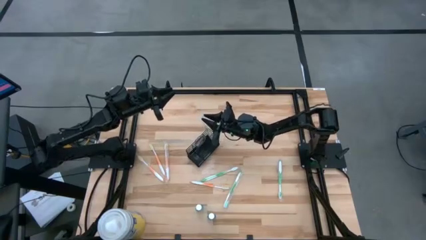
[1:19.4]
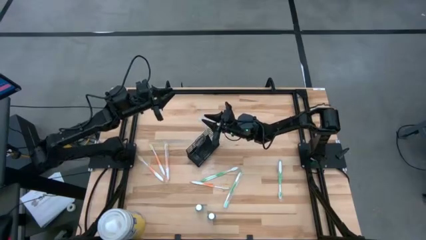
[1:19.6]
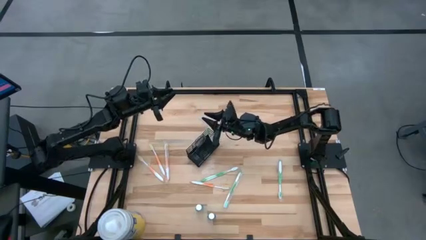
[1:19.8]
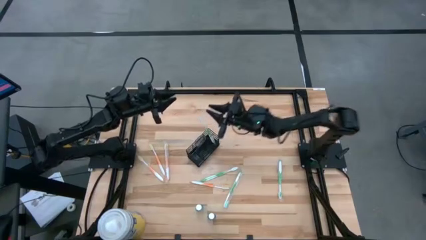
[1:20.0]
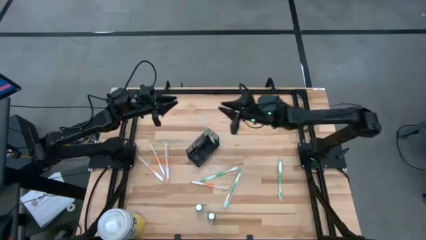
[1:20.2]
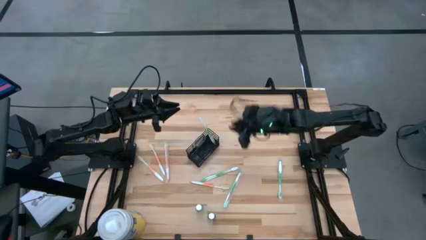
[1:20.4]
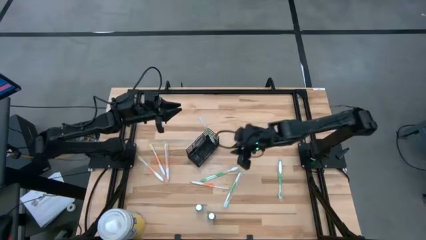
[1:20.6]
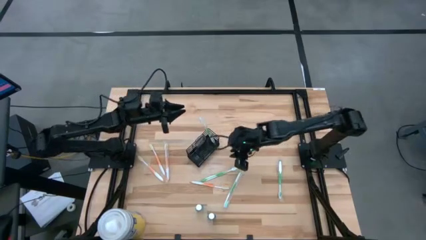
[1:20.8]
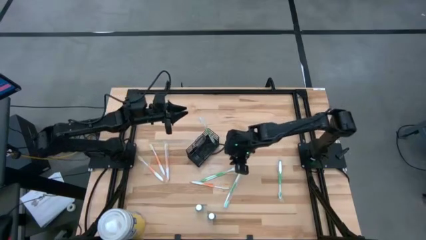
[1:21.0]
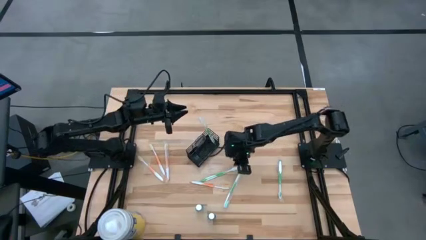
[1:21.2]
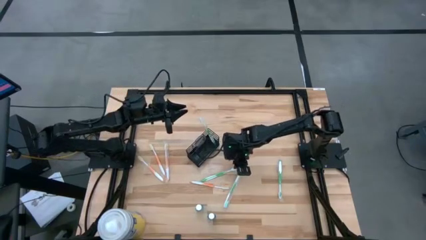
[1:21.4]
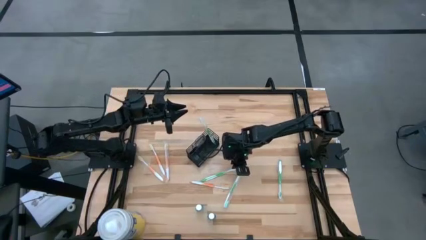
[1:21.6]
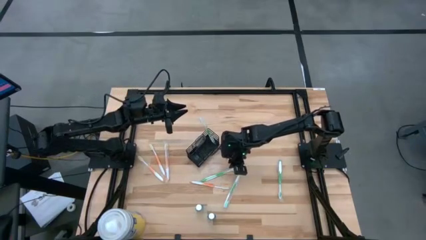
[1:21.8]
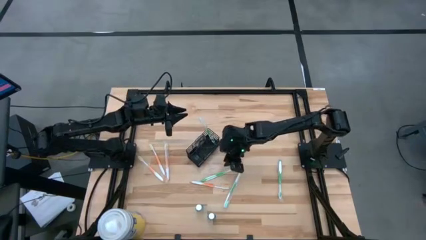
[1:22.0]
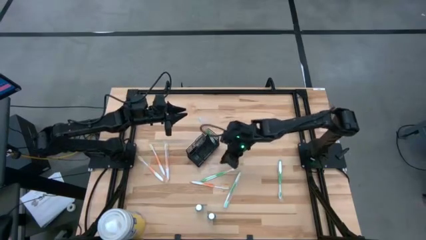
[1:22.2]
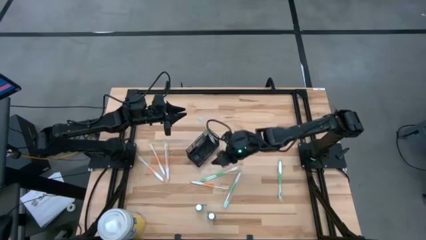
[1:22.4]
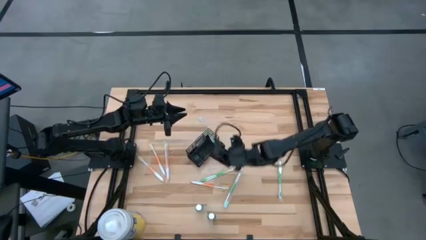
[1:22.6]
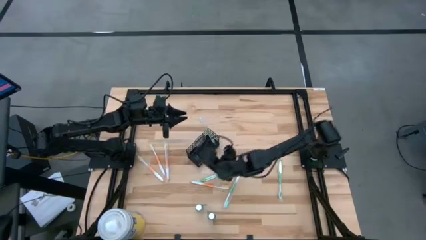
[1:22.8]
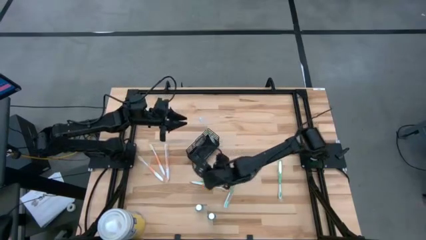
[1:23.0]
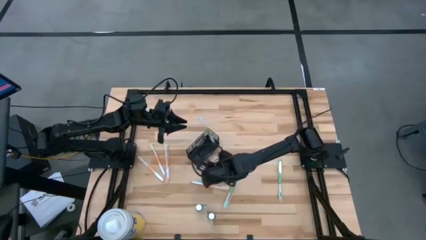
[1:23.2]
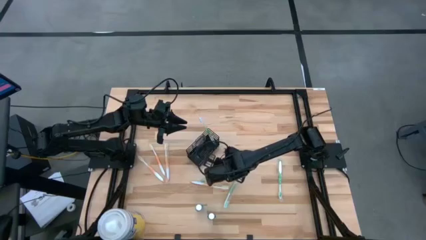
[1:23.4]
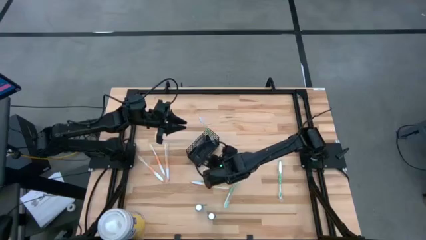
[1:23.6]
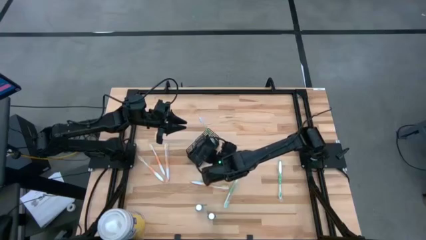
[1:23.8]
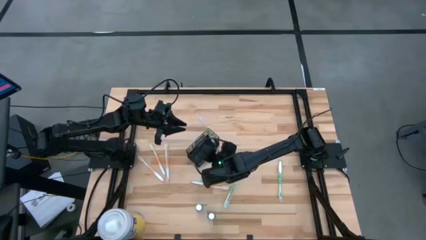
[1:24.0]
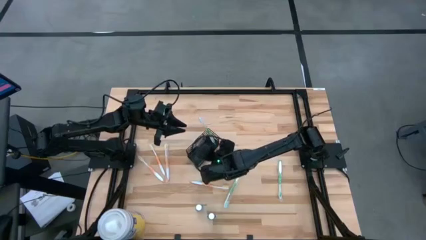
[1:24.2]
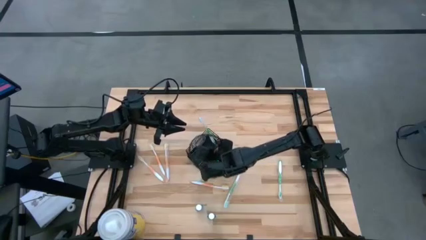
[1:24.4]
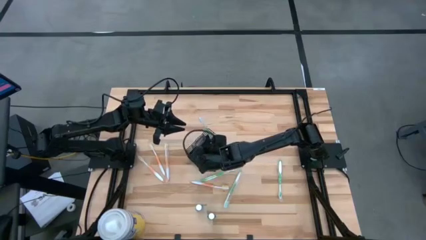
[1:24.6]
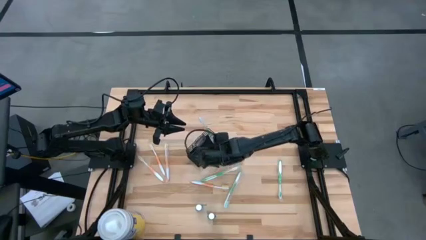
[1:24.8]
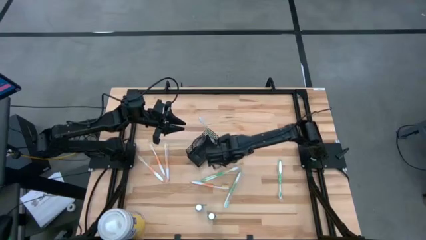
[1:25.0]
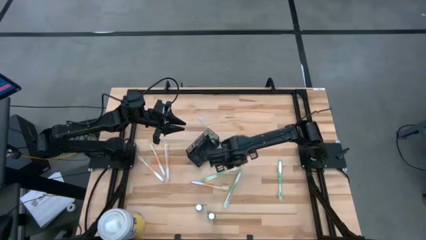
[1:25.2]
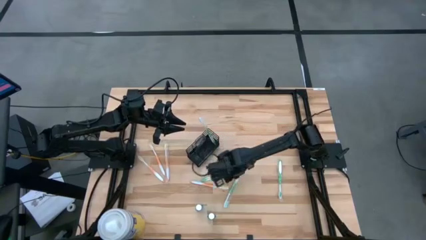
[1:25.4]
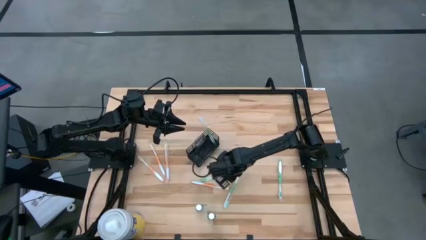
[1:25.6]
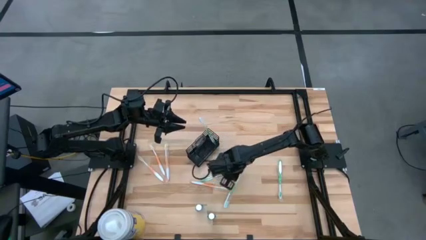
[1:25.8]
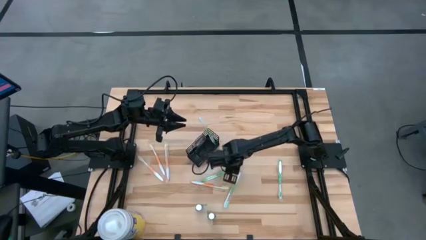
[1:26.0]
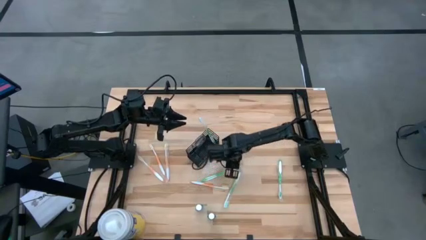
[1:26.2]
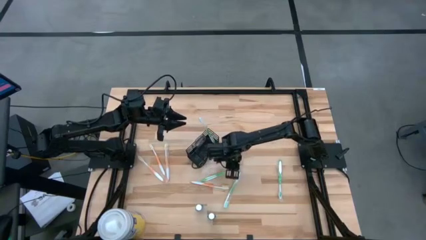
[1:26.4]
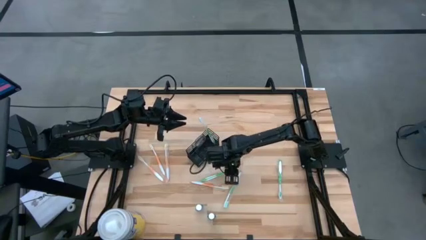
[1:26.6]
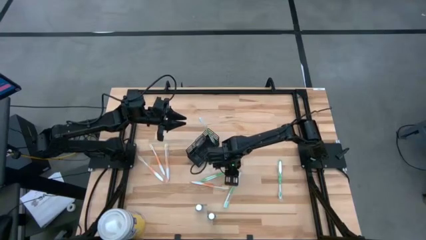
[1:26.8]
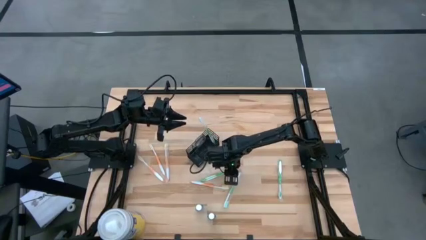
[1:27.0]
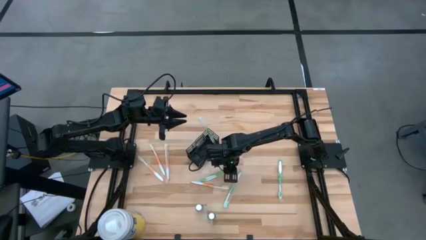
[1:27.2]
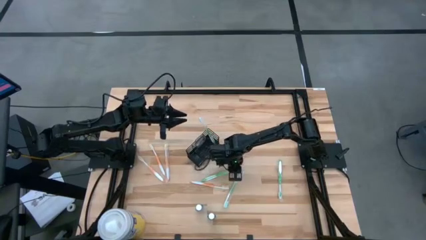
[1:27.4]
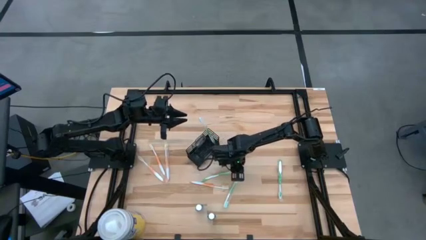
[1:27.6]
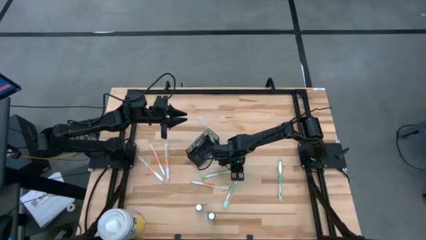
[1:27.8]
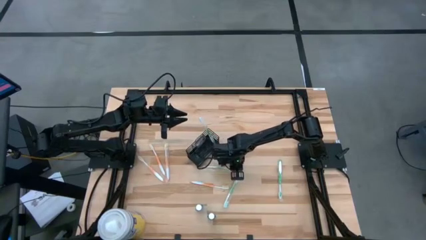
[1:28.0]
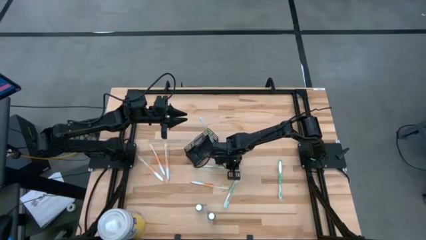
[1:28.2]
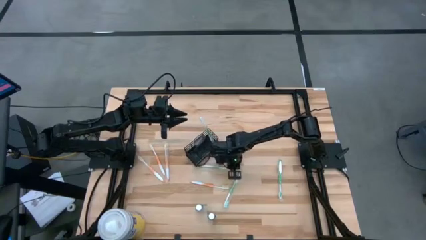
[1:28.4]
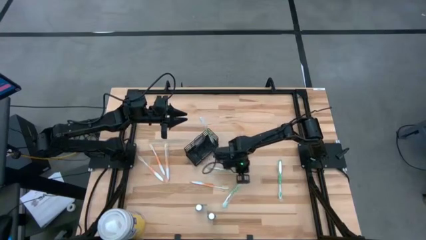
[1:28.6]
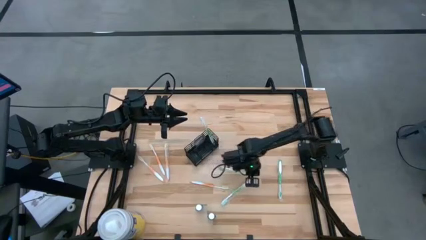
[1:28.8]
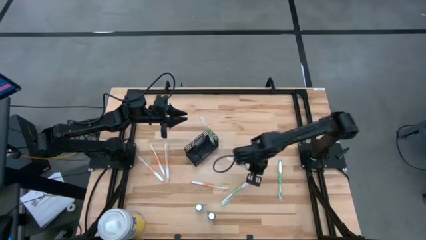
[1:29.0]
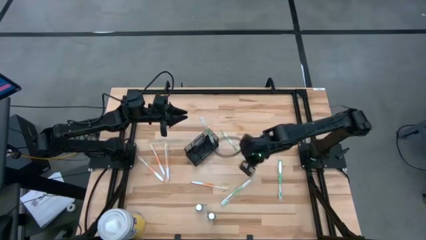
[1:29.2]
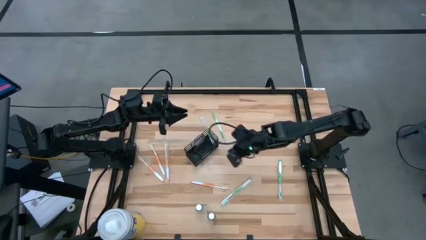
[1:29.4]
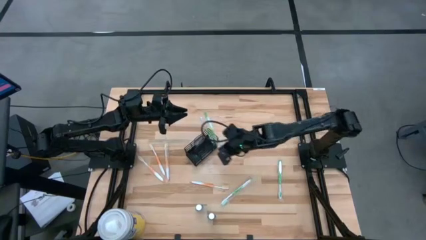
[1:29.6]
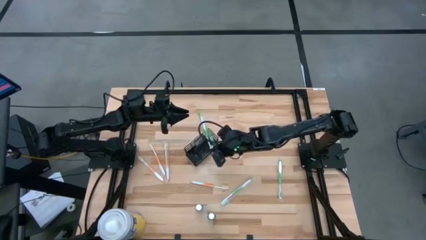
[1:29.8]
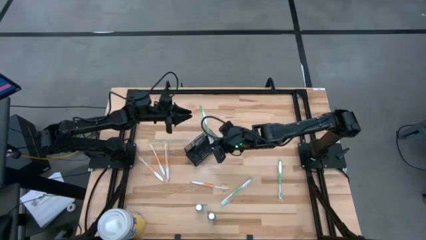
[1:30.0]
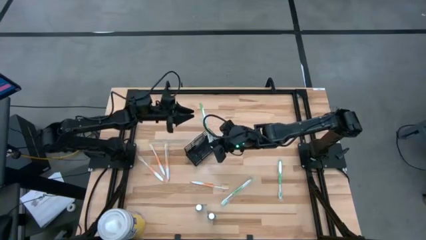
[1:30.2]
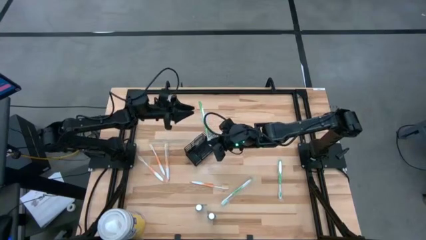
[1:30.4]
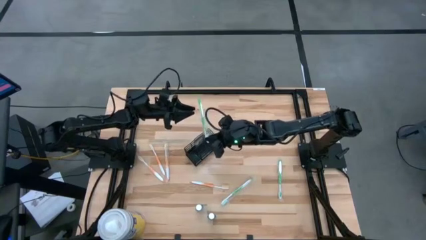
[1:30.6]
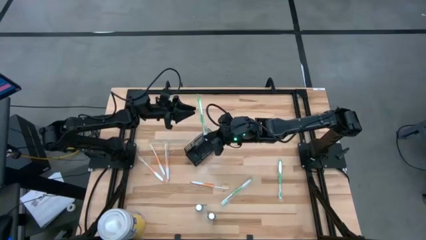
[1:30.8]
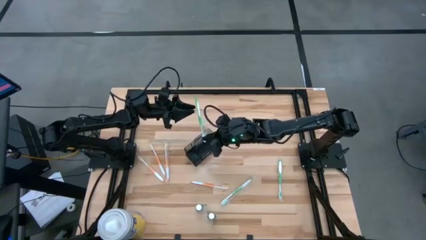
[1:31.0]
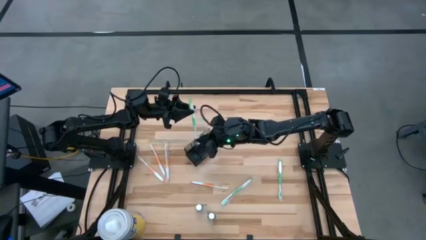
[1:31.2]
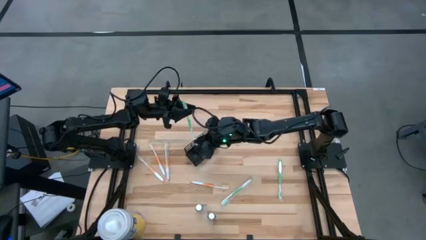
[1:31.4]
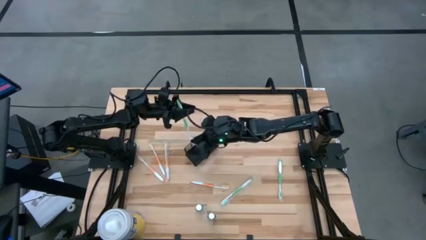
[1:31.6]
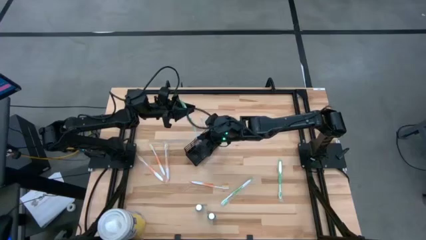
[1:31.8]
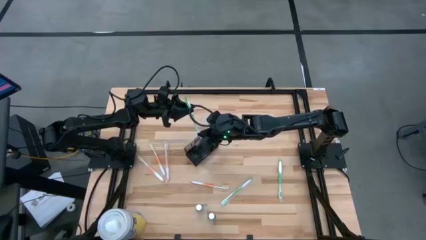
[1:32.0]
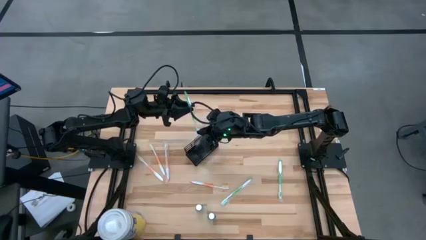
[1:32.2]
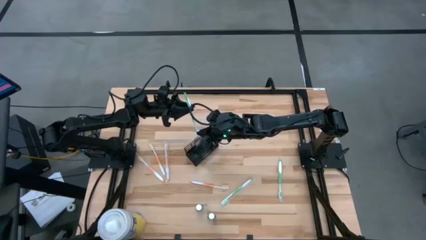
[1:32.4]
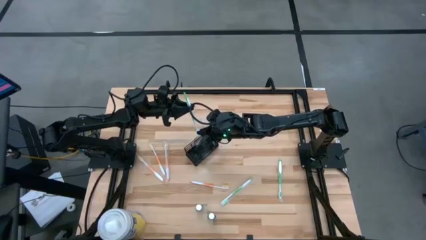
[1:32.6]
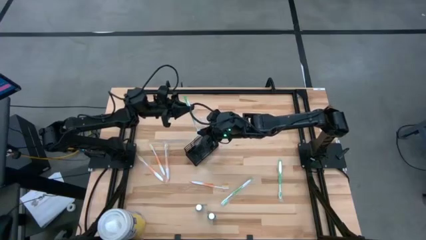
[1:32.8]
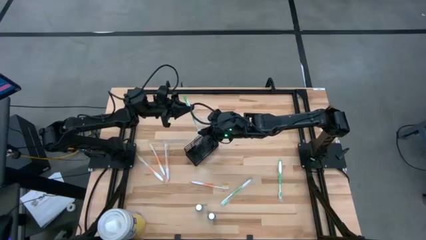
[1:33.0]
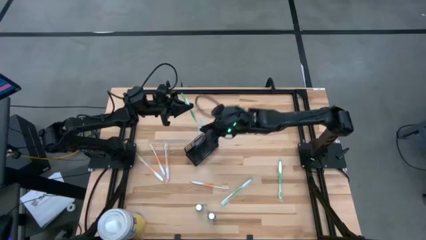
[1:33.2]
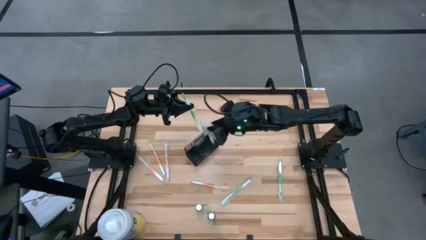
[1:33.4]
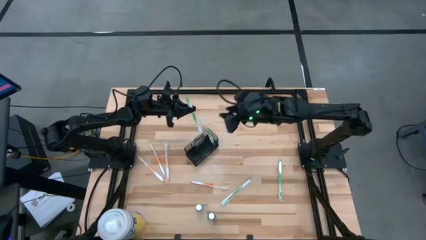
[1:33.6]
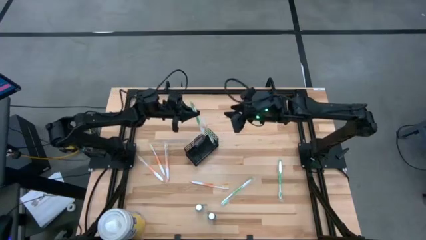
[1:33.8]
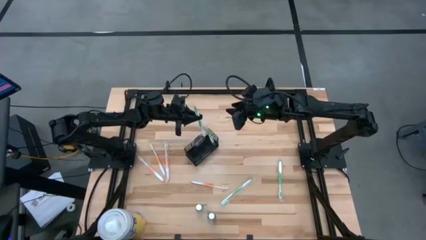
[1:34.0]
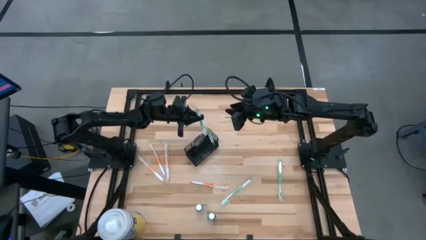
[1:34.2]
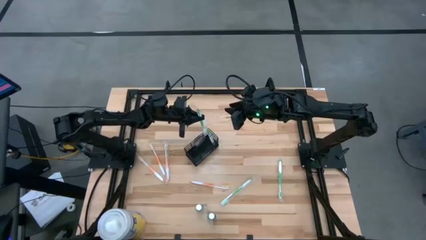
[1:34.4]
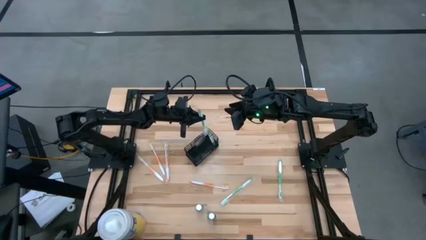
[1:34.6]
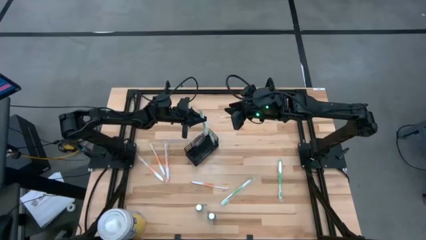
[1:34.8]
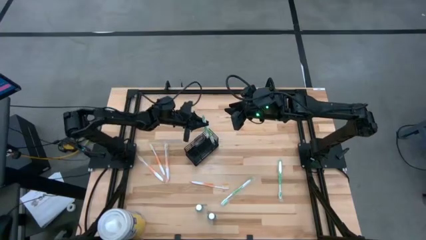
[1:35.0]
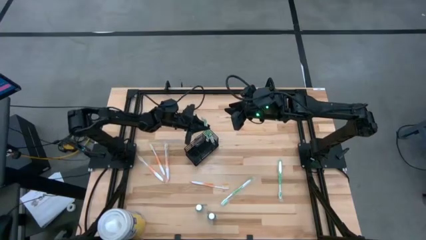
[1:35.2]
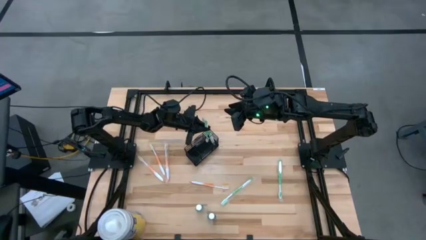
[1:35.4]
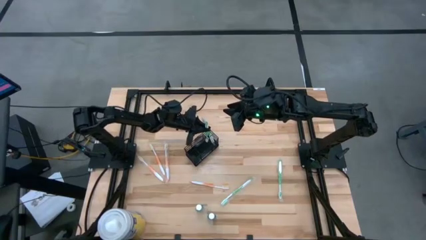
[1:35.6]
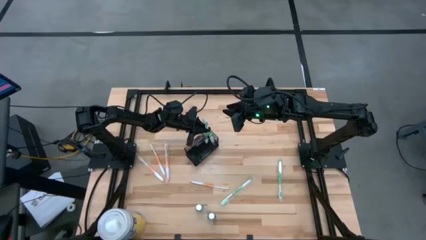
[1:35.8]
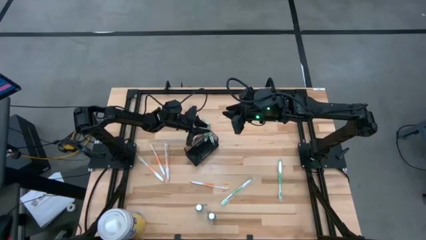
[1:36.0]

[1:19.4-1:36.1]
Task: Pick & Place toothbrushing station
Put the left green toothbrush into the wire organizer
